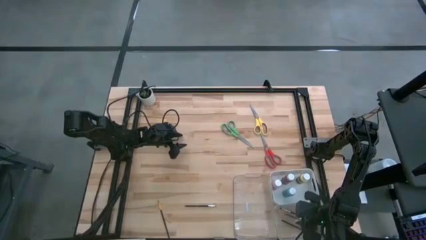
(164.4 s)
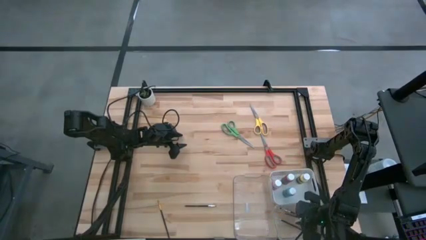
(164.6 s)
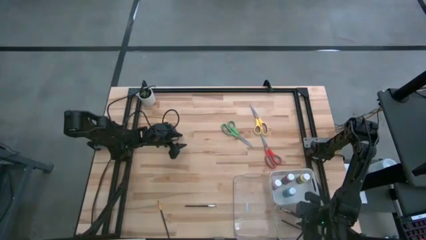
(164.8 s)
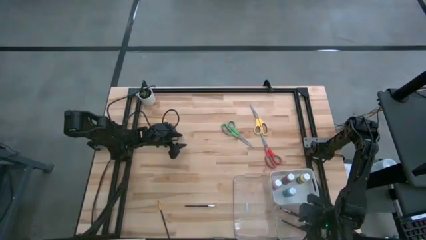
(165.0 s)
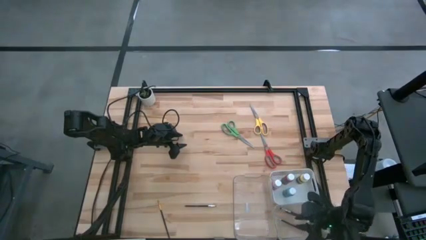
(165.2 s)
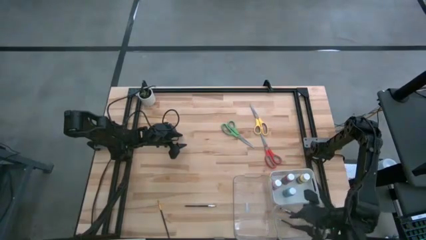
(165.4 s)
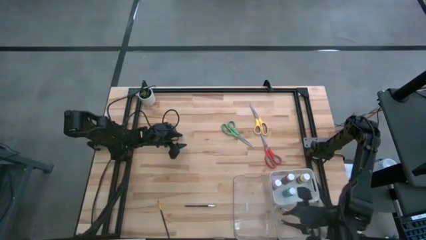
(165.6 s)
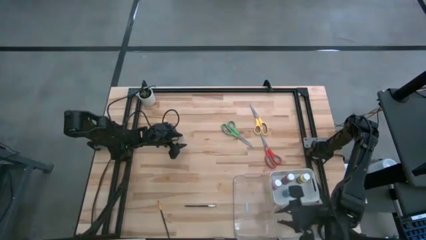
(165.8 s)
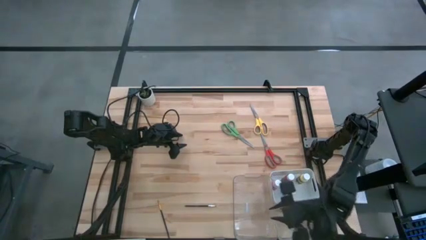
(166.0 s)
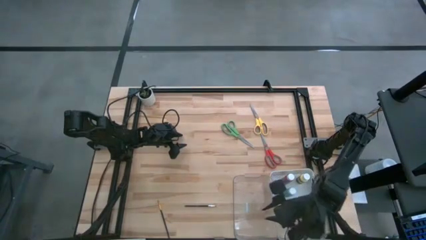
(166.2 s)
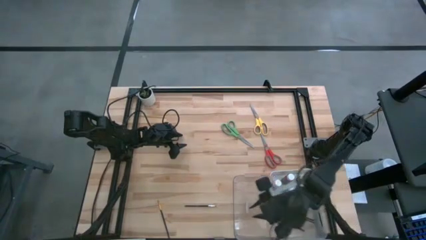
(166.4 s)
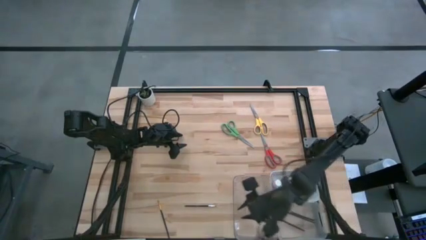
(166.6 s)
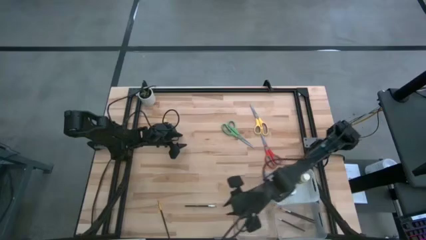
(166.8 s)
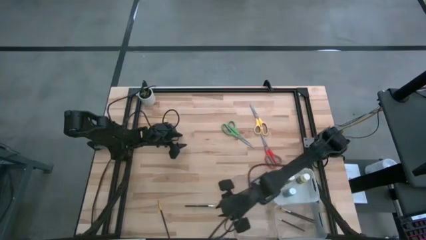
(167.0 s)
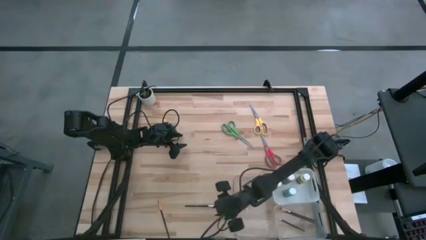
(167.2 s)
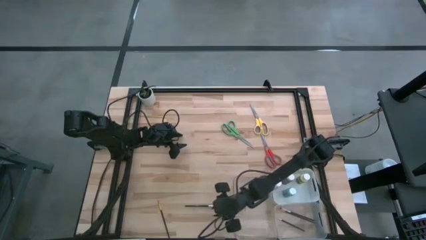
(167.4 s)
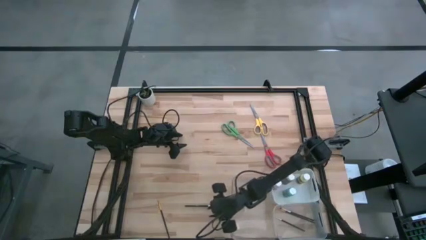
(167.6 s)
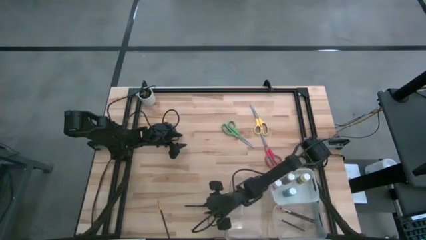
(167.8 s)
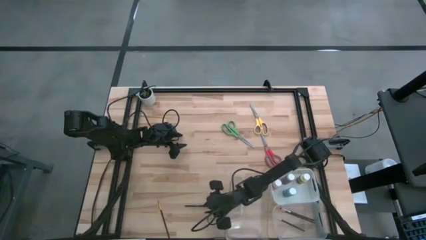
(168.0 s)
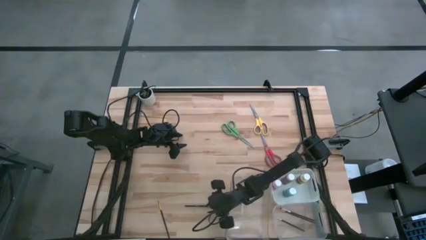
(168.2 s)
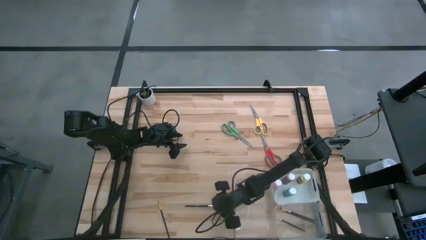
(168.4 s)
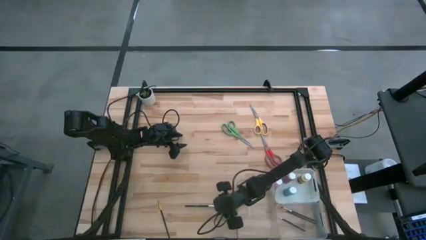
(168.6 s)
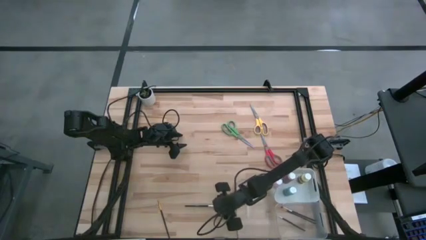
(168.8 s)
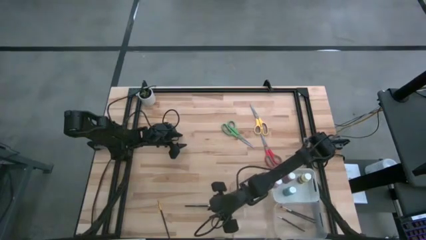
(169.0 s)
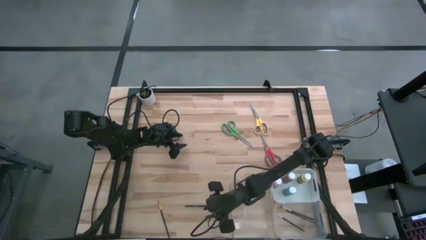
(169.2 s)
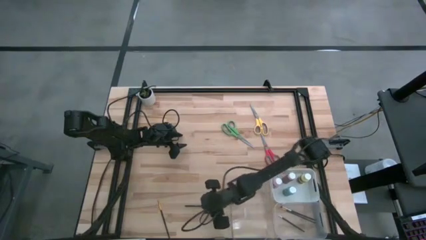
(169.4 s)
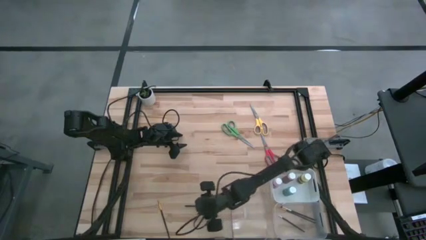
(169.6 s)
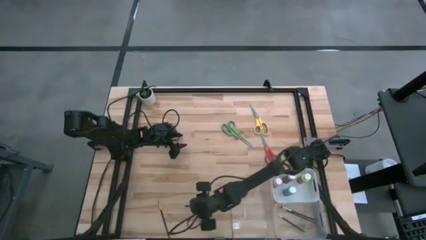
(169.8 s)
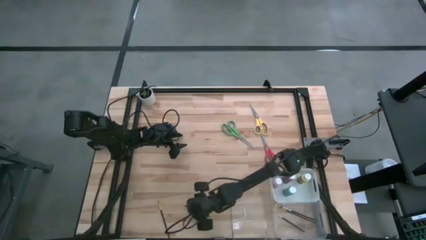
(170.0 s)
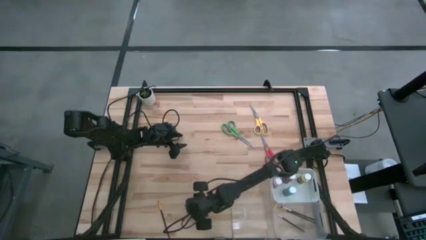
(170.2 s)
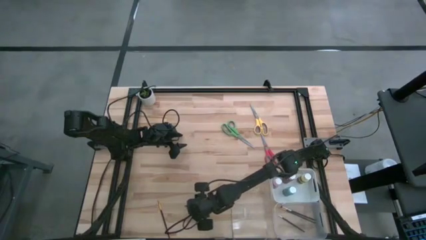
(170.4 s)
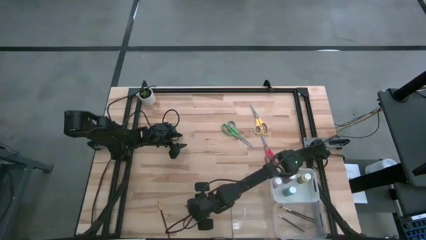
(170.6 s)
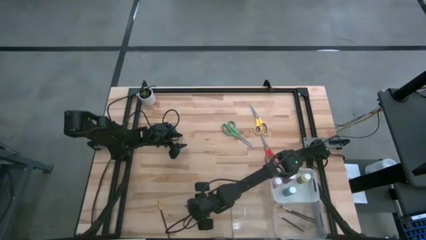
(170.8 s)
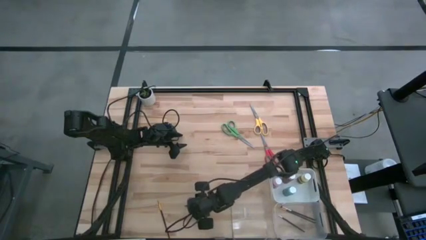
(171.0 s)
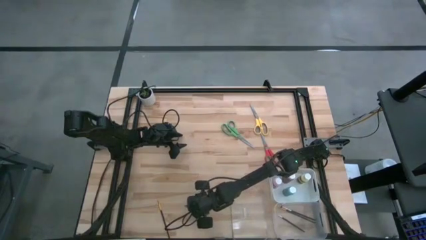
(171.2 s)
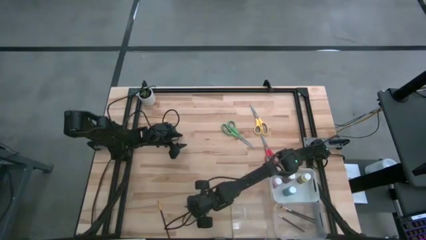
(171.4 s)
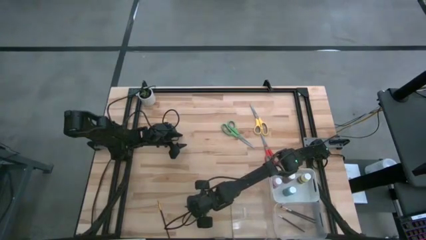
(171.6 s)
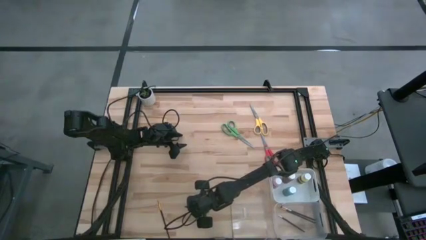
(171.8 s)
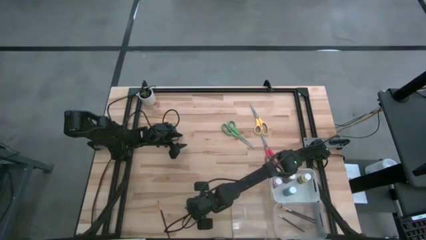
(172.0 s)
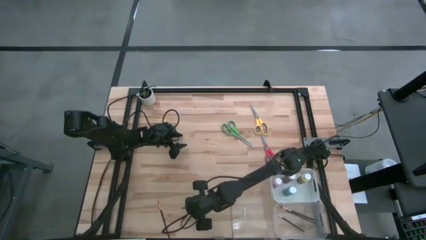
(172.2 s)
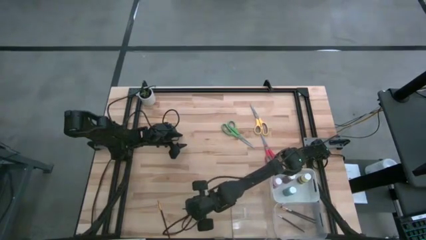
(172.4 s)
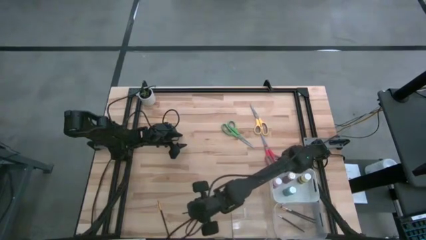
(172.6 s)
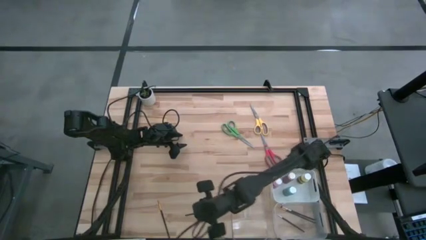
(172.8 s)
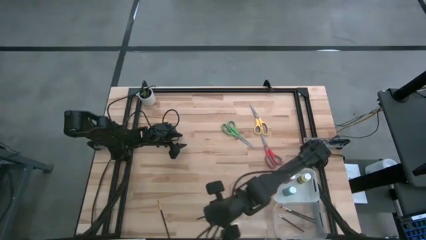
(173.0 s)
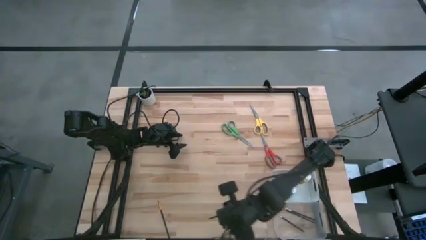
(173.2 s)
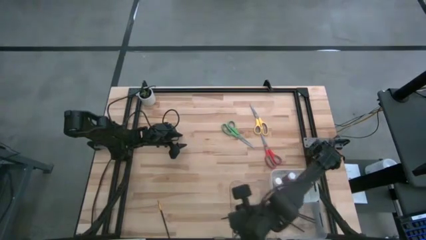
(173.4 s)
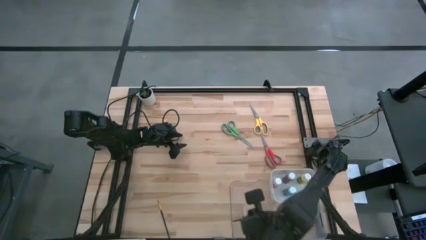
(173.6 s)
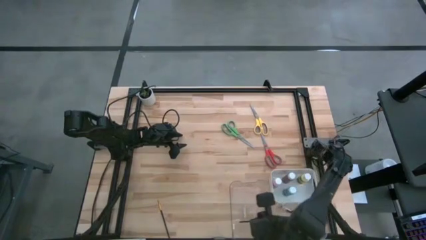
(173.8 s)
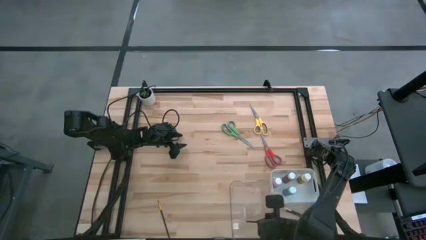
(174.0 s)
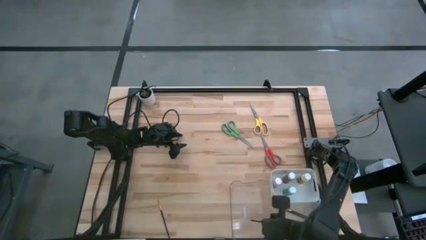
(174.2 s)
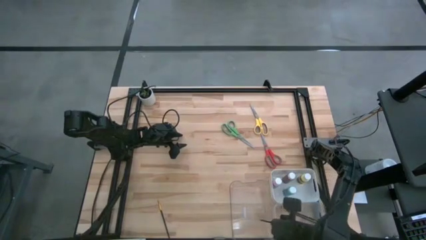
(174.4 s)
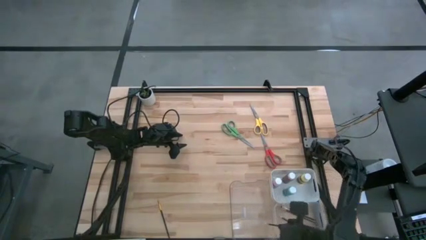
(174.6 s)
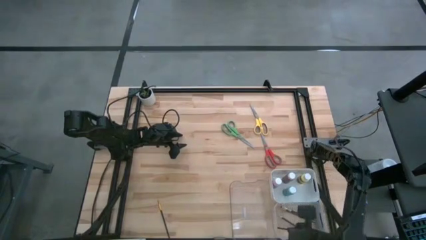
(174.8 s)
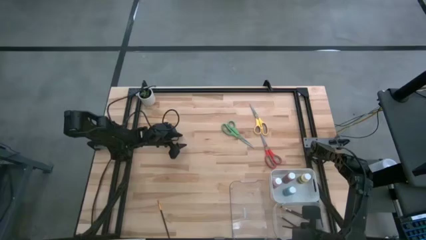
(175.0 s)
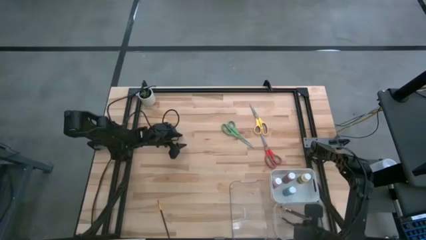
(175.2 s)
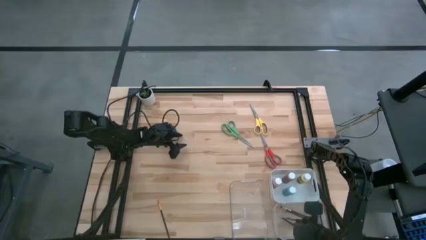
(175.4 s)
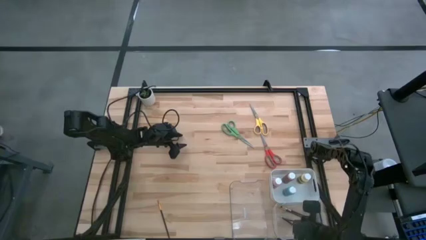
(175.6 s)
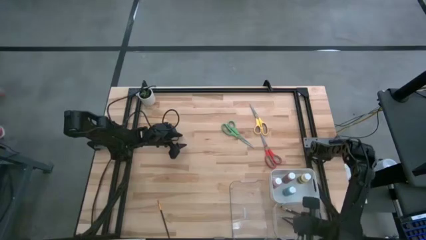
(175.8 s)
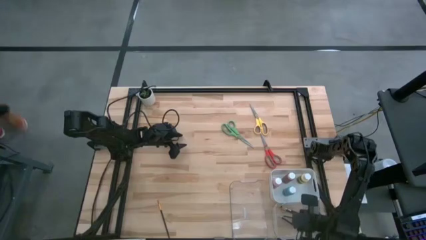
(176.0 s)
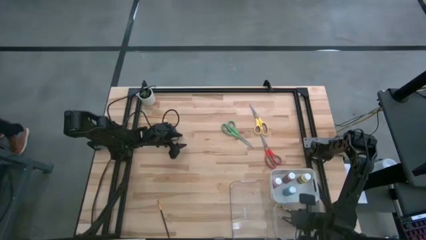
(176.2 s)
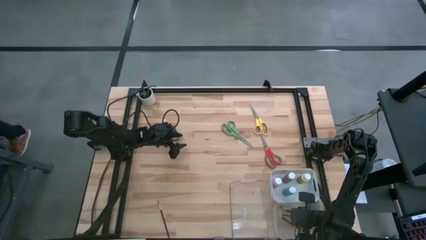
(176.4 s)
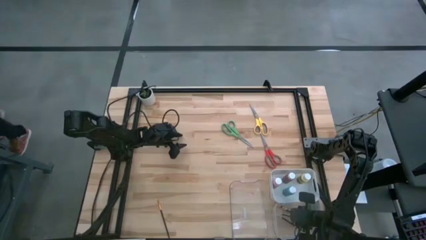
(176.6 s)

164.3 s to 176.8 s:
Task: Pick & Place Paint Supplies
Put the silver paintbrush into the right transparent bin

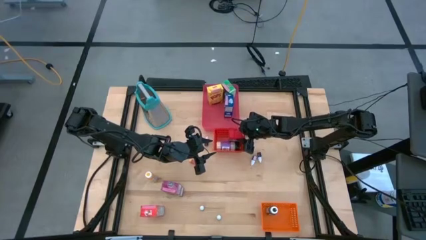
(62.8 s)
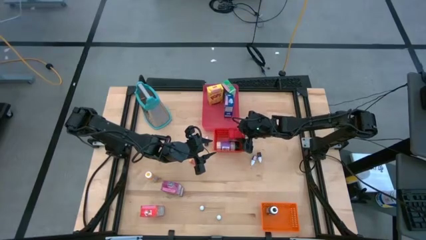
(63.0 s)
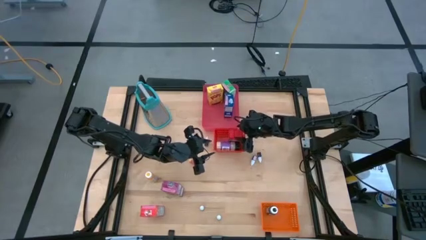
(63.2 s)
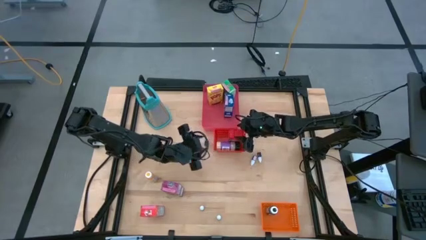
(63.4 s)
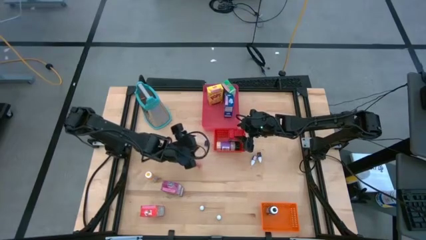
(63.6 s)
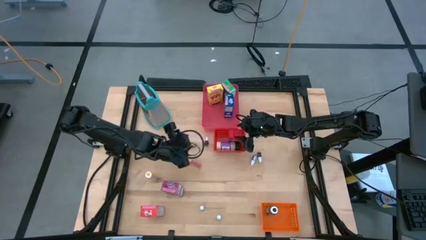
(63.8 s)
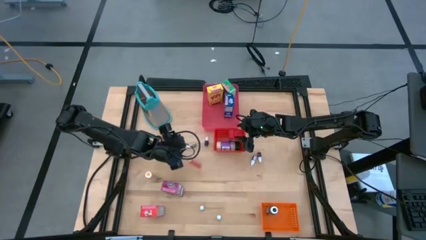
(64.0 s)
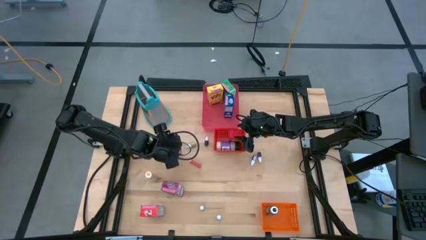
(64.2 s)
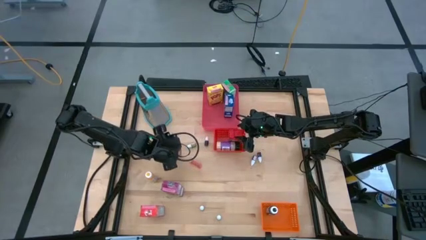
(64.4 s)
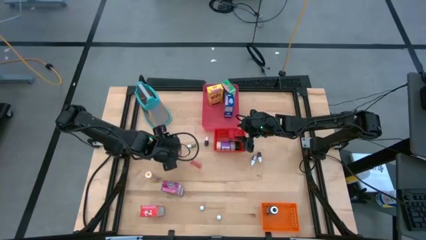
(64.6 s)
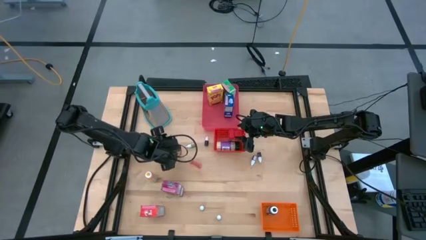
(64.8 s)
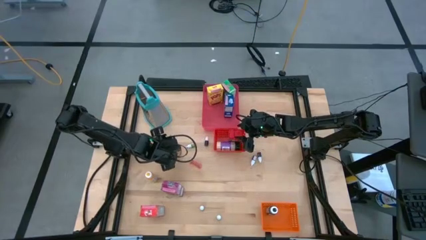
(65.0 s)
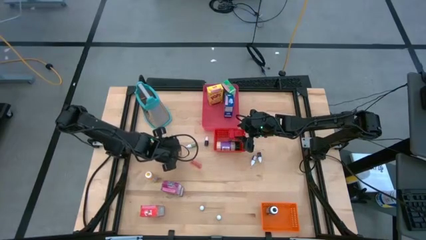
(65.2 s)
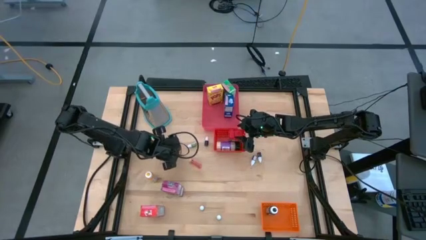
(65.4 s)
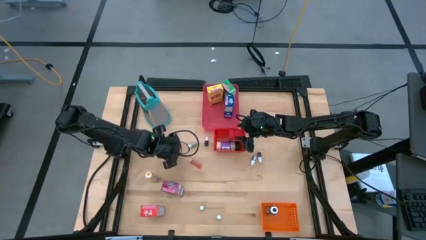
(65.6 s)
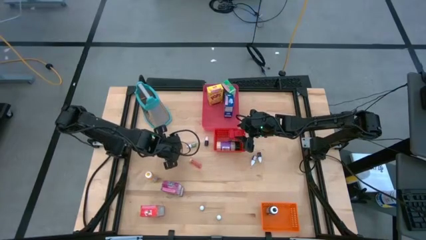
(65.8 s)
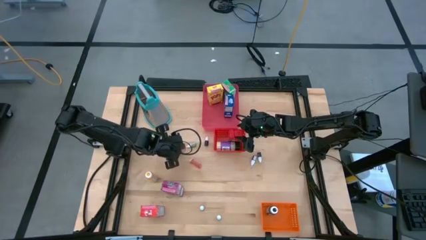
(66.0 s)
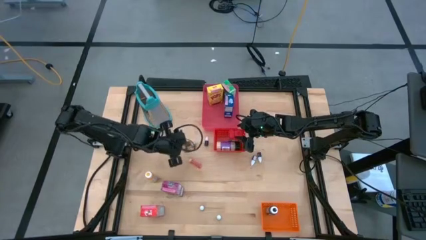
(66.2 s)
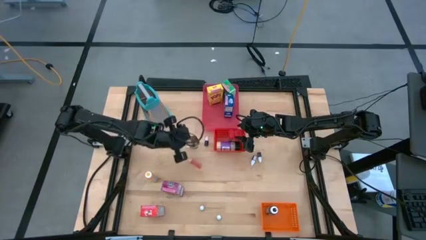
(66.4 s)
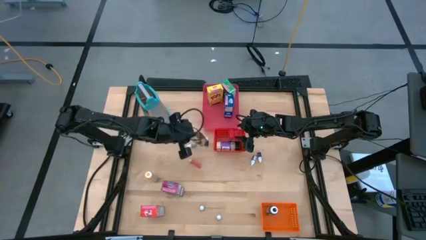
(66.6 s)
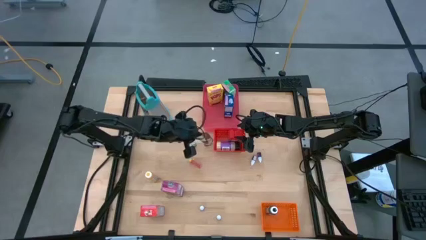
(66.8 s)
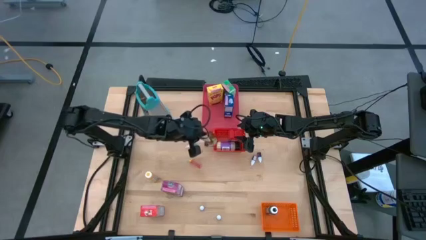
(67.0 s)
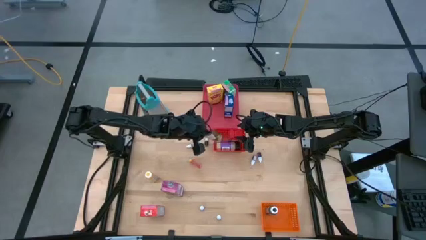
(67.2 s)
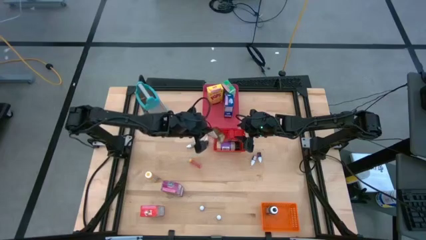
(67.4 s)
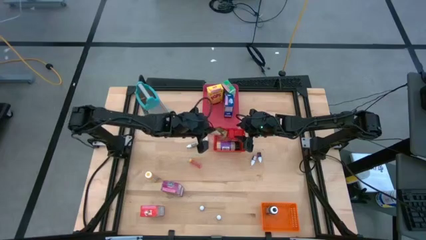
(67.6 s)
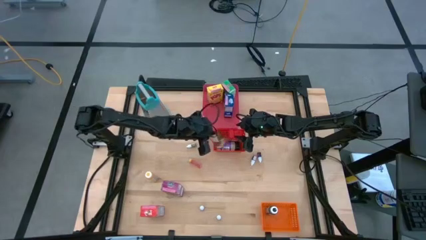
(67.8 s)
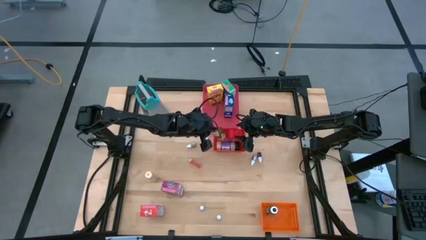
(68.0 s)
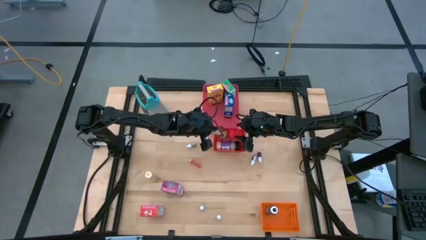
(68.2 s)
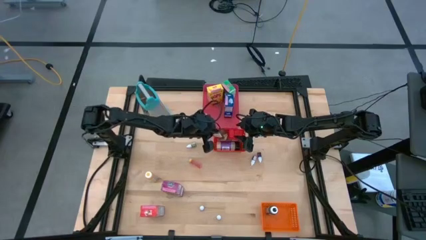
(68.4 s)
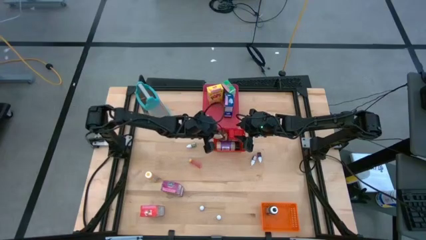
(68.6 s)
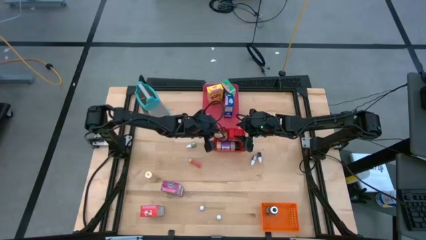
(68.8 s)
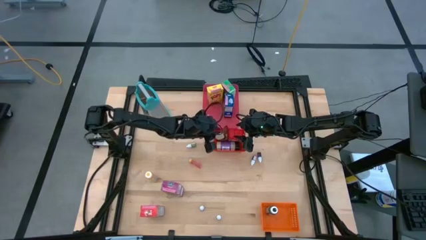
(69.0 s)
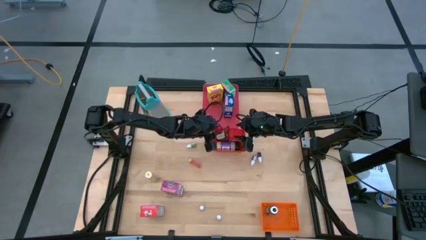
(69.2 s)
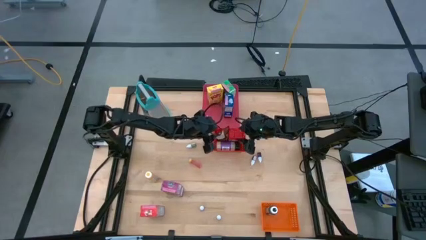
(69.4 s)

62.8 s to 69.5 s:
Task: Pick & Place Kitchen Items
Put the orange seasoning pack into the red bin
